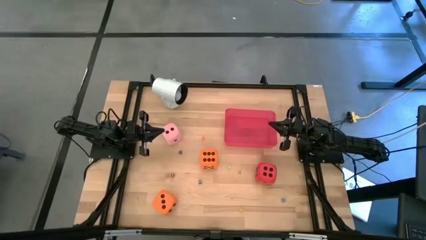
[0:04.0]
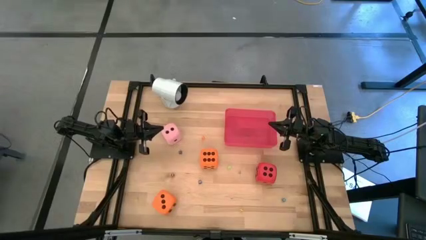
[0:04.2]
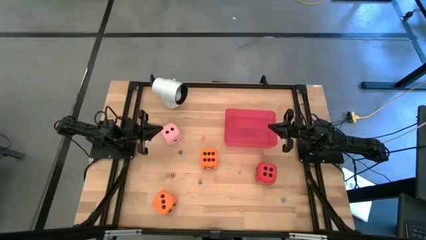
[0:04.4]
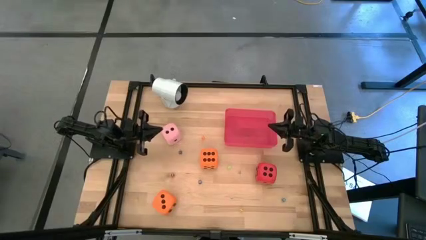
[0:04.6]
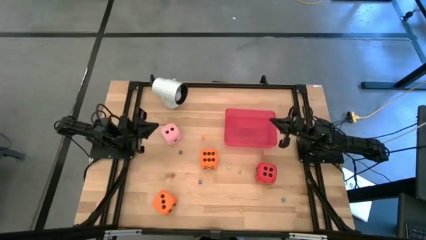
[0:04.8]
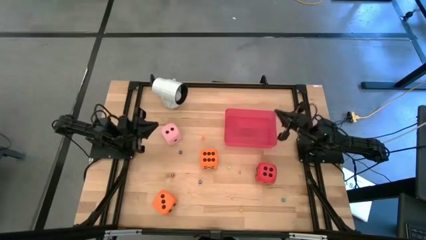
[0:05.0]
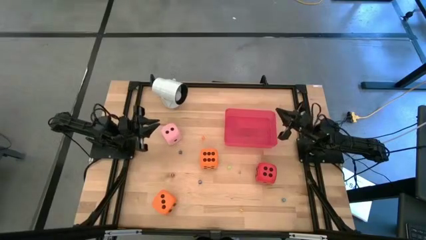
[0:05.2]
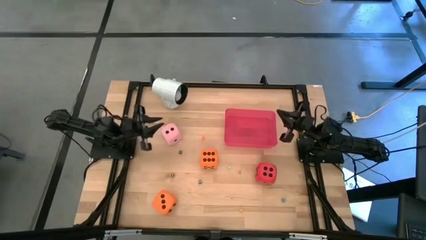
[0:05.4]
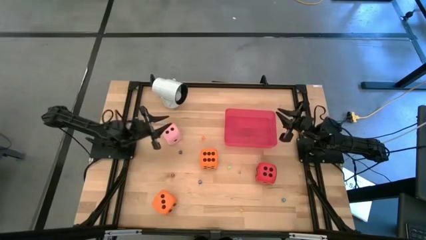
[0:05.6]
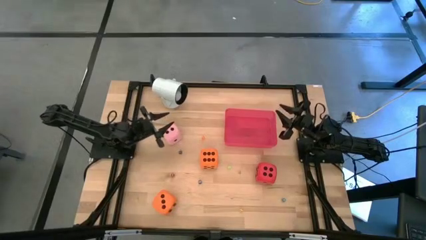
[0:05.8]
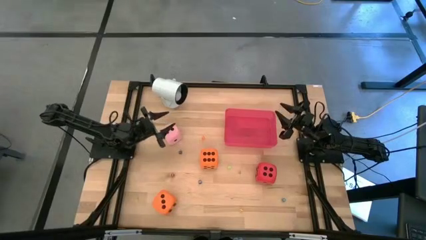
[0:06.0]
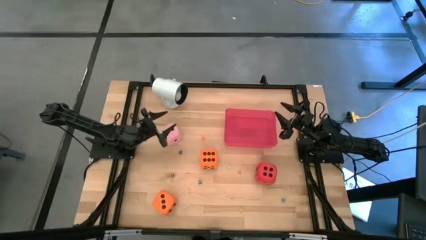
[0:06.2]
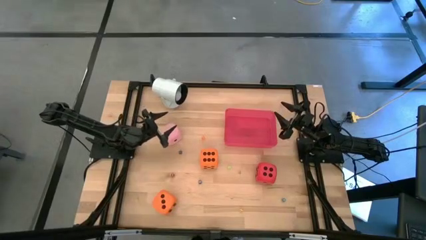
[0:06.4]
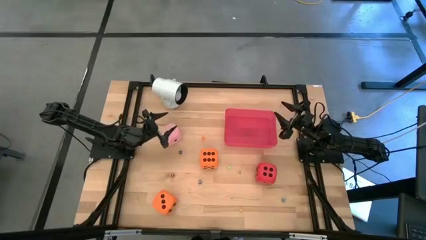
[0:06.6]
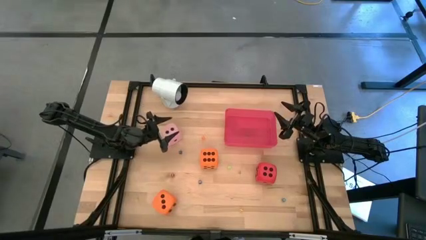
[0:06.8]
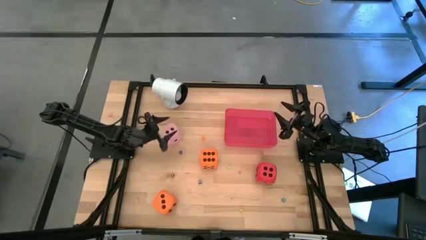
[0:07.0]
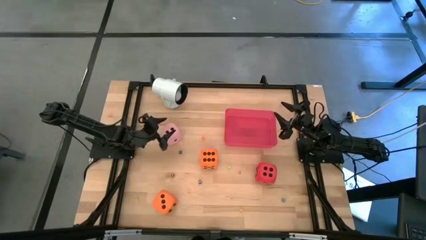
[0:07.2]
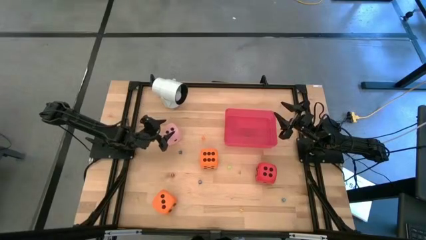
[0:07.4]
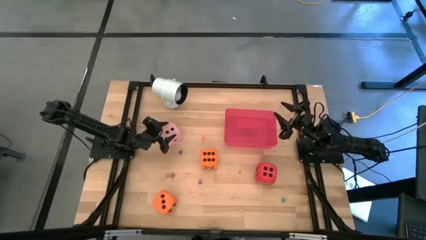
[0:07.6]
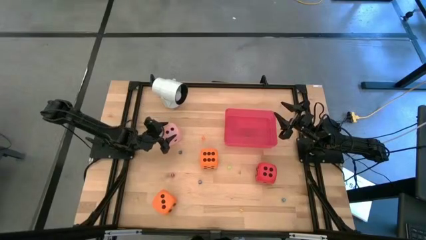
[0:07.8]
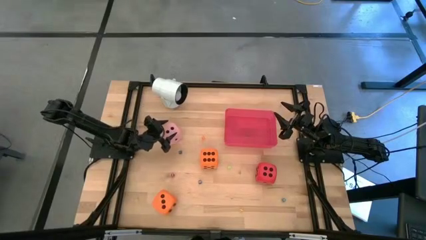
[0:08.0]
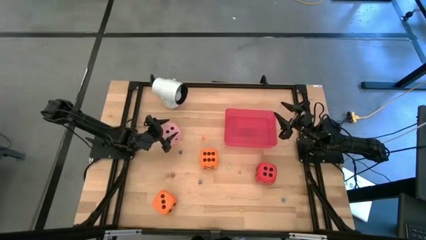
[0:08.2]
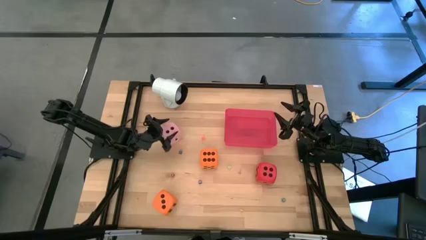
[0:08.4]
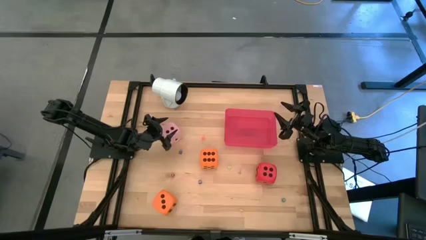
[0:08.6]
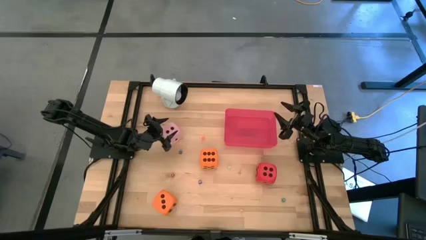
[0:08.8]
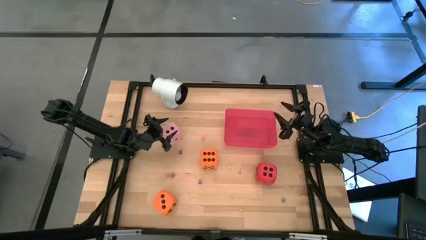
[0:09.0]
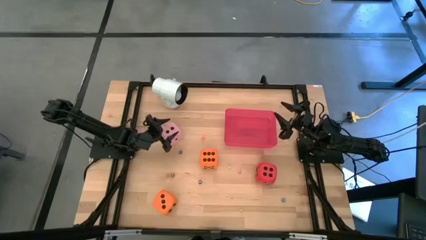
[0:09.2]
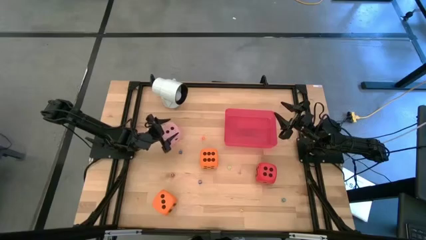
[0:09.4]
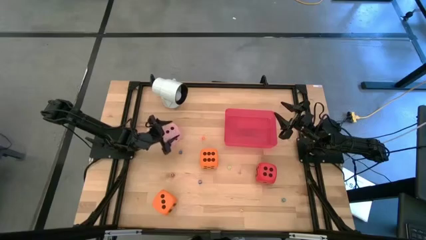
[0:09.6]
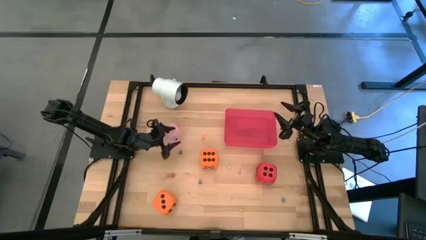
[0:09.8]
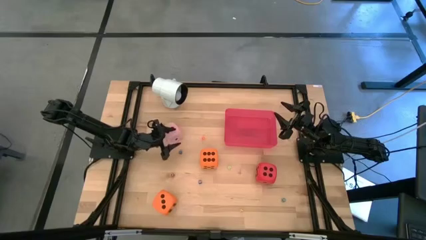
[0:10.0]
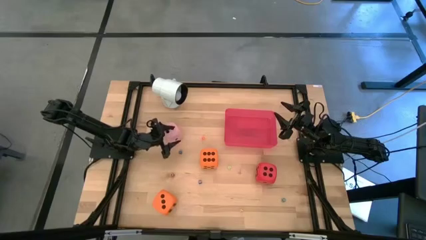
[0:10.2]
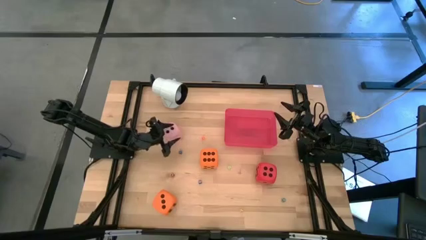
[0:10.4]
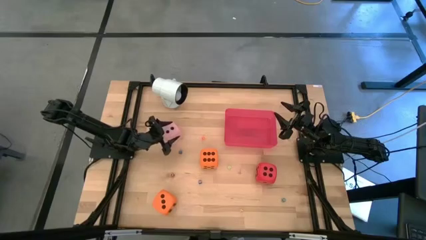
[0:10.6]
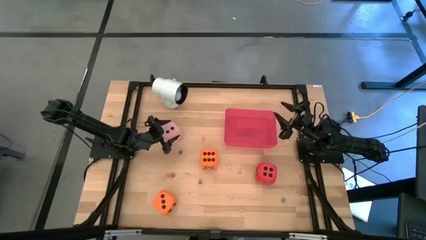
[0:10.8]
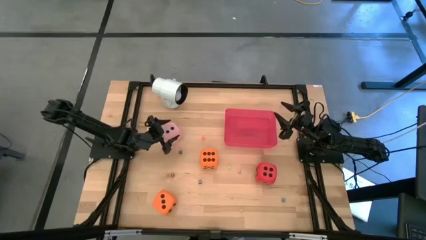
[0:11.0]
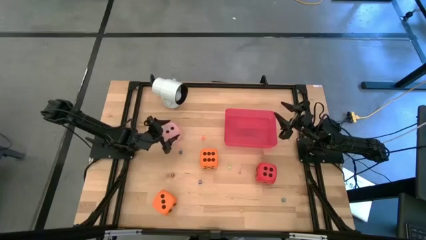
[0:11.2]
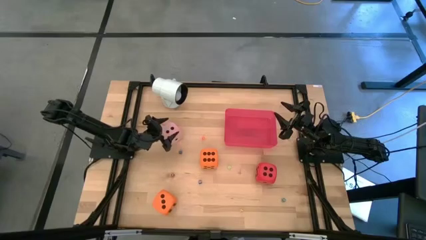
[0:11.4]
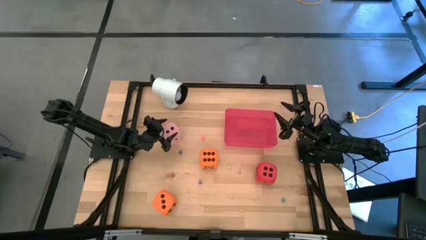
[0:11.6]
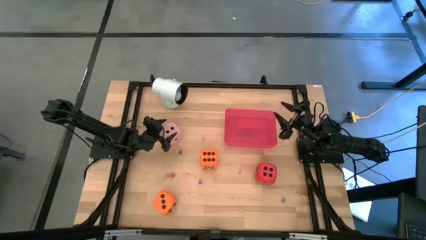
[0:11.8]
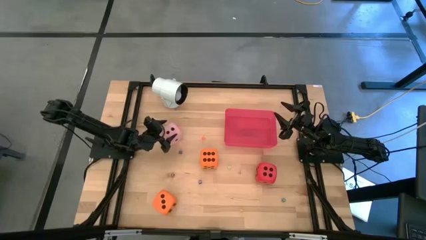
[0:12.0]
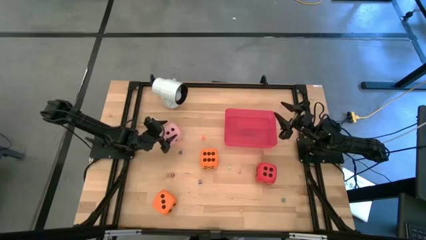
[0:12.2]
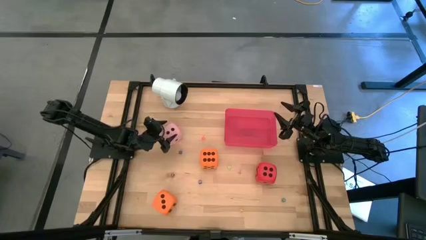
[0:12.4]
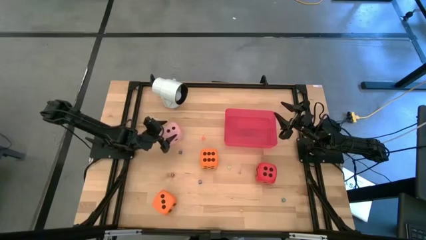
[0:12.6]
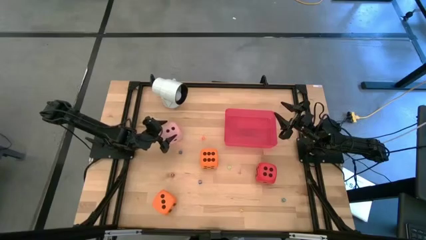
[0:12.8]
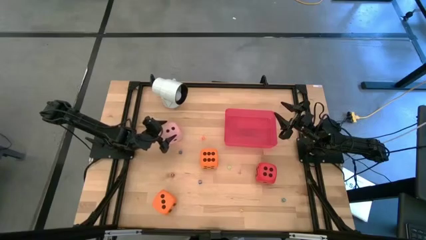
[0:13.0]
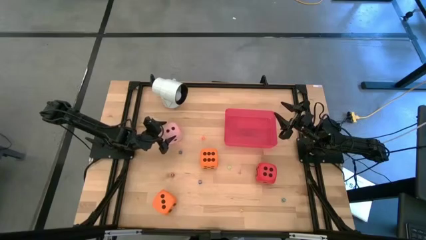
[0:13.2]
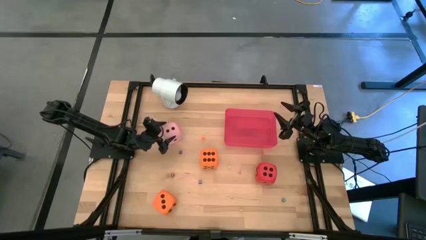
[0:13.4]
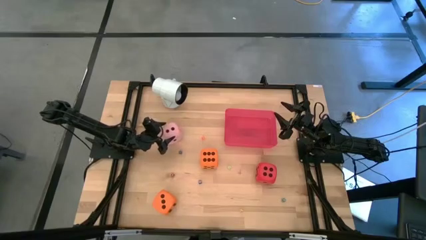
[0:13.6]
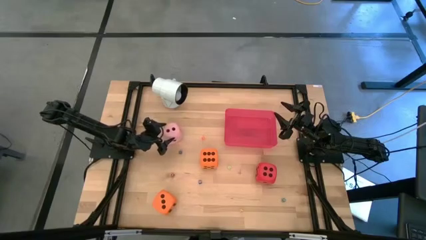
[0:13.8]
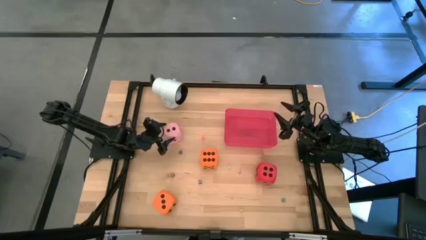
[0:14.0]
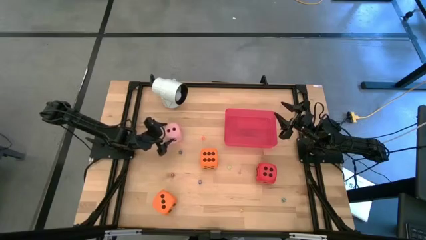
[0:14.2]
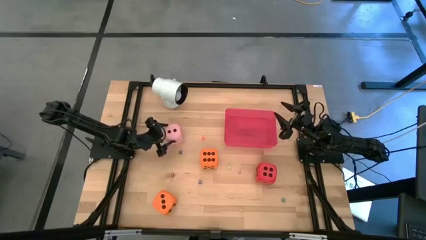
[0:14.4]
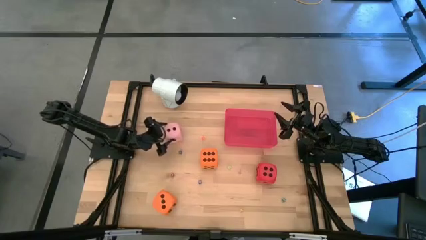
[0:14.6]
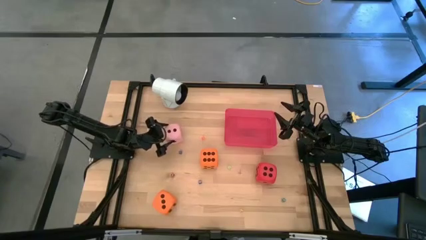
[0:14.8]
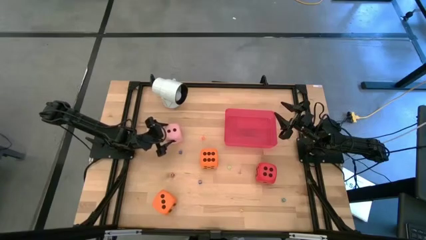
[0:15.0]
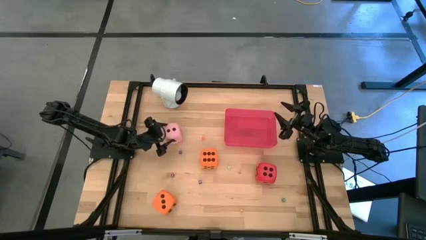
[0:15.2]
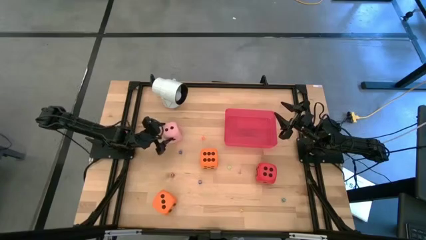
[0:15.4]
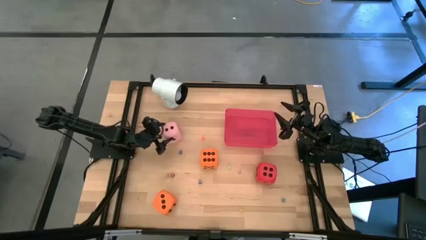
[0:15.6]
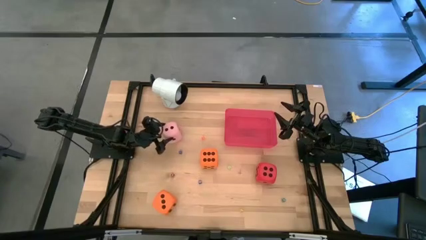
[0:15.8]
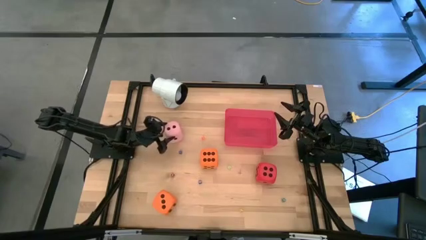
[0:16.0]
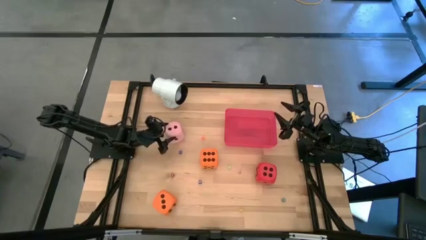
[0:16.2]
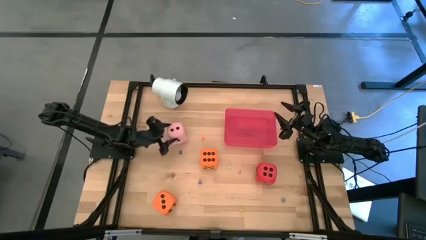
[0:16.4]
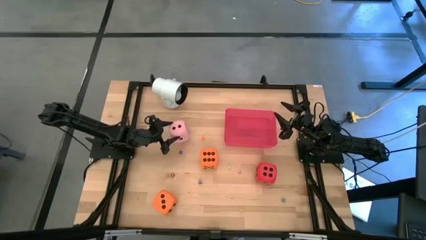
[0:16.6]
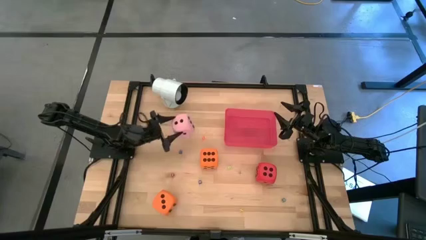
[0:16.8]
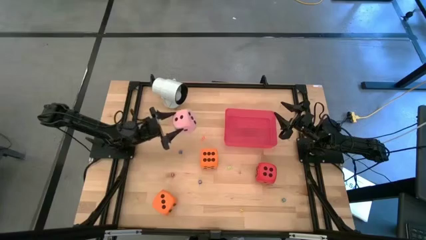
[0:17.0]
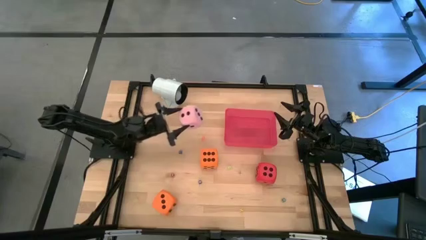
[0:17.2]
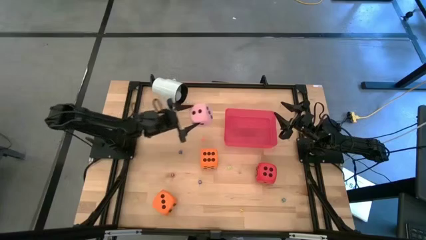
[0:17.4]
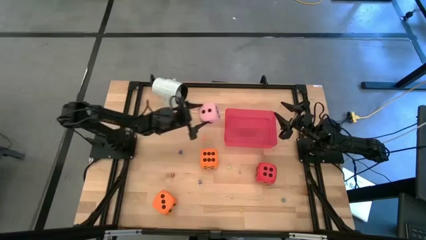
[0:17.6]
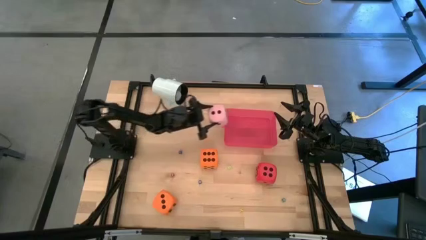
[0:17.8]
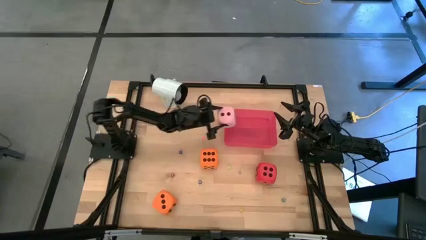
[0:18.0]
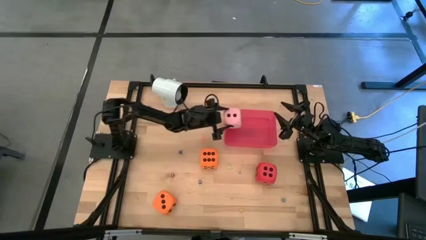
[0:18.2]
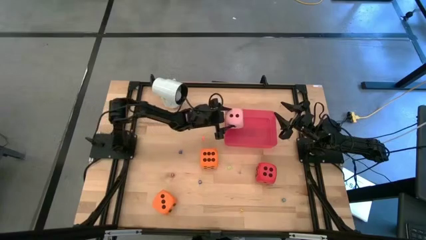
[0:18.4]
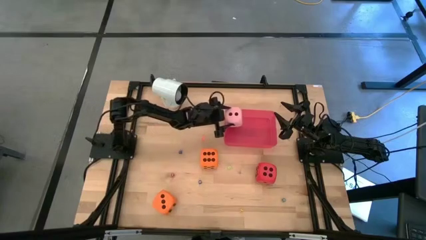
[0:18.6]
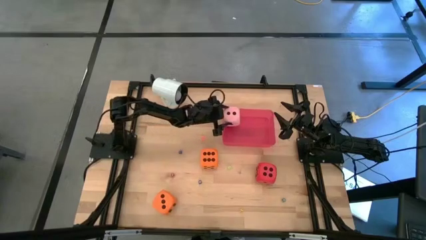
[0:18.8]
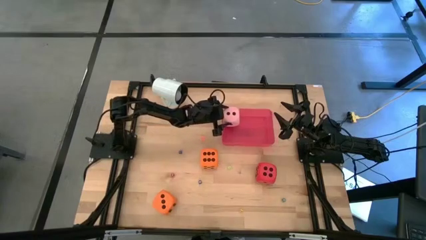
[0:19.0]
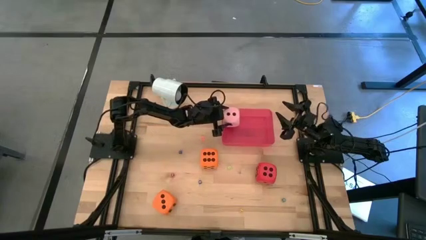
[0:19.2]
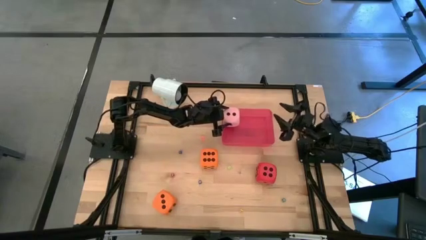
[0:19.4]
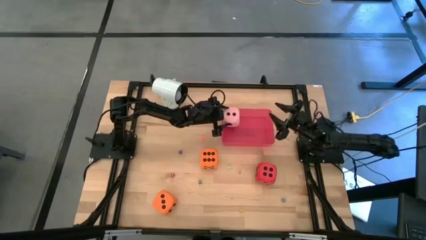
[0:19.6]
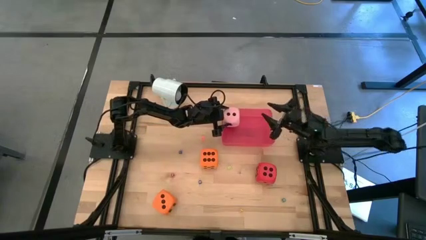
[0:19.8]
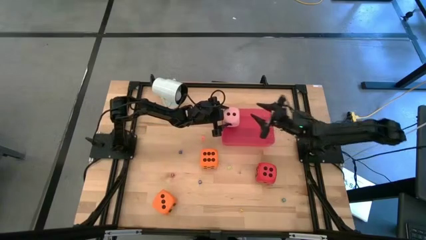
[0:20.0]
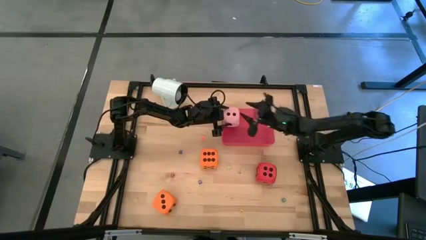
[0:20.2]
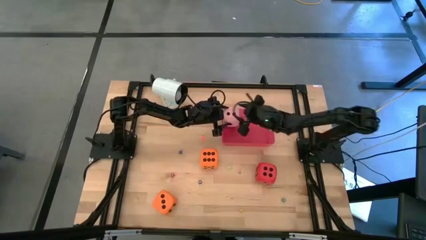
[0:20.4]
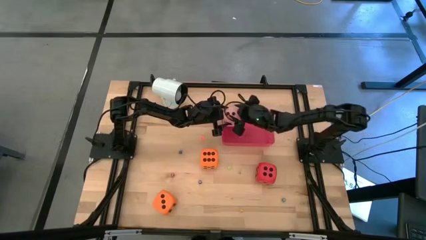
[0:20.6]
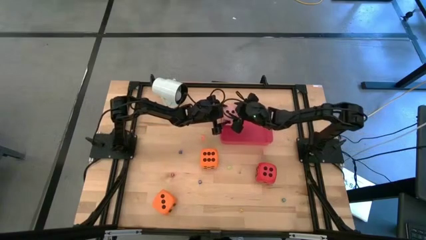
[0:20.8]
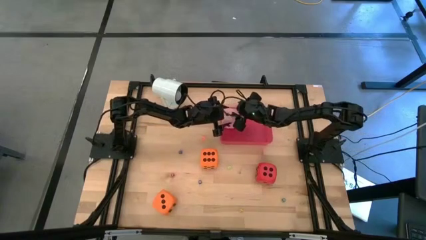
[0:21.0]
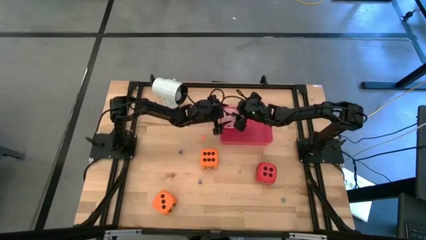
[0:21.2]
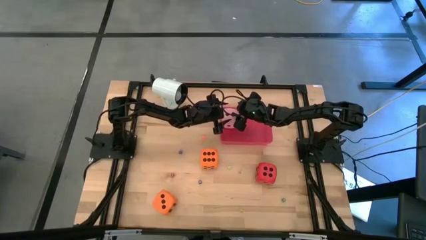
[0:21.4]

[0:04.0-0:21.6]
Task: Pick & Place Dice
Put the big pink dice into the red bin
